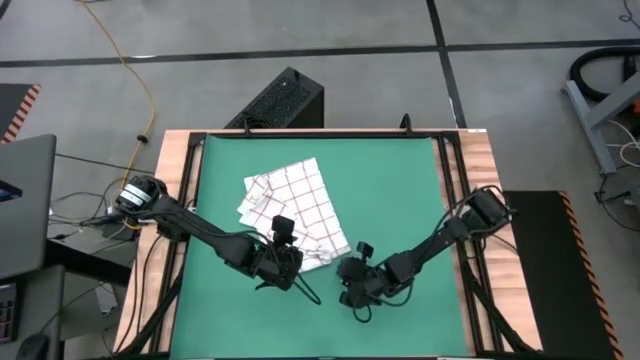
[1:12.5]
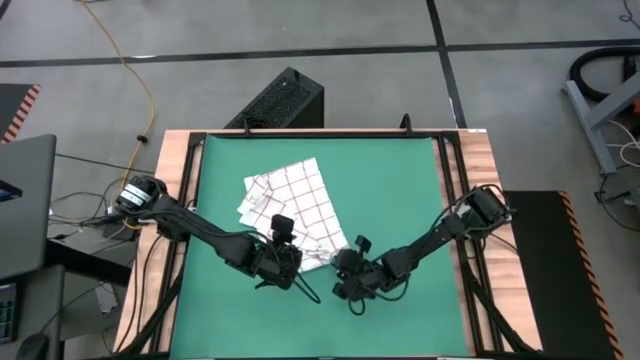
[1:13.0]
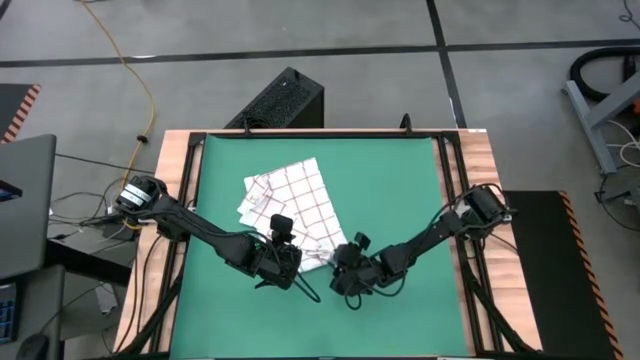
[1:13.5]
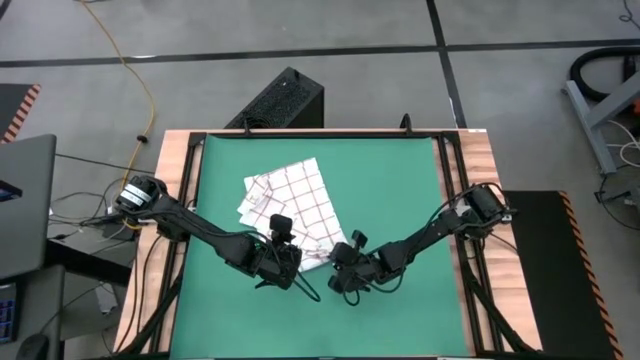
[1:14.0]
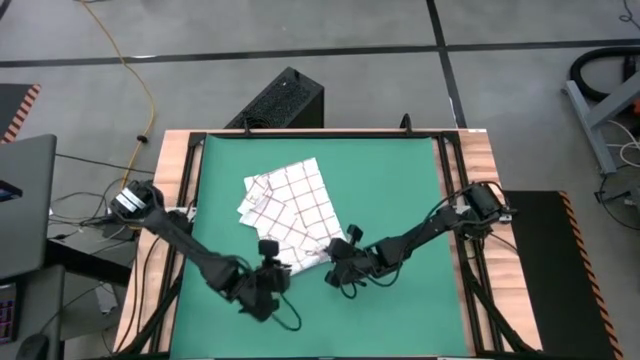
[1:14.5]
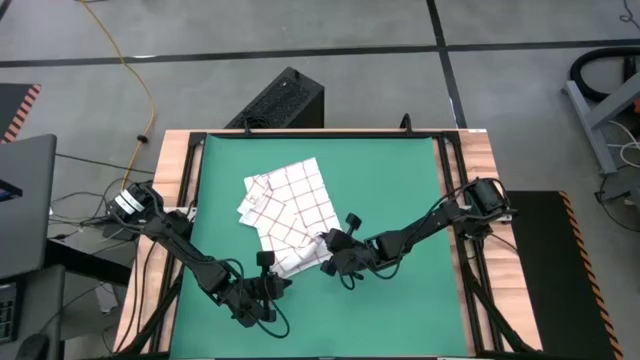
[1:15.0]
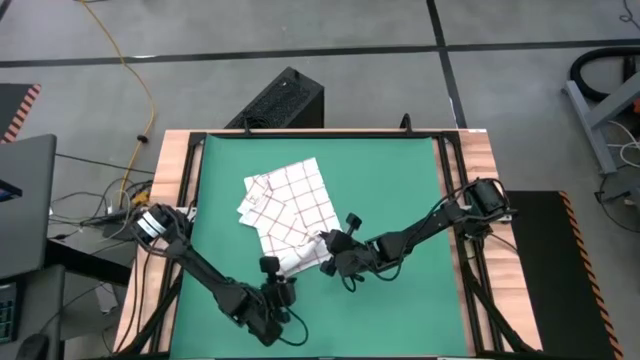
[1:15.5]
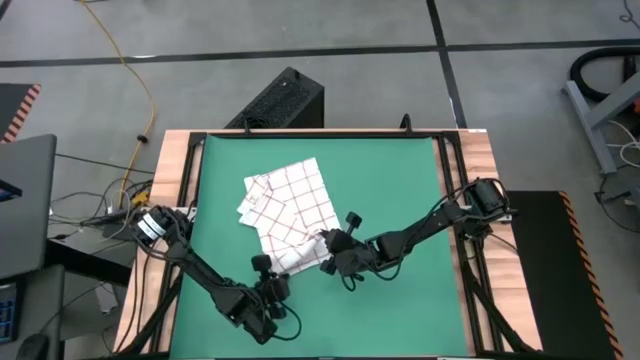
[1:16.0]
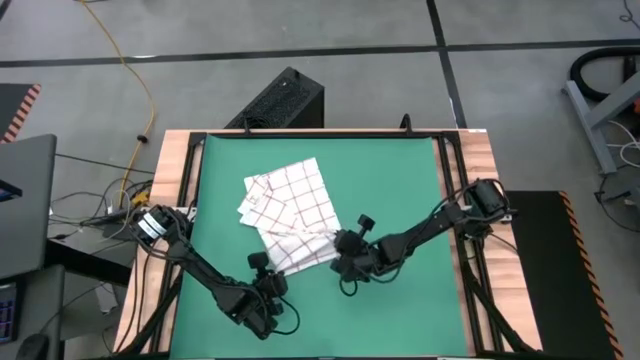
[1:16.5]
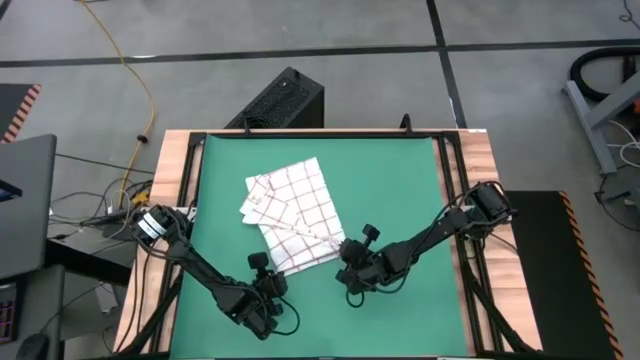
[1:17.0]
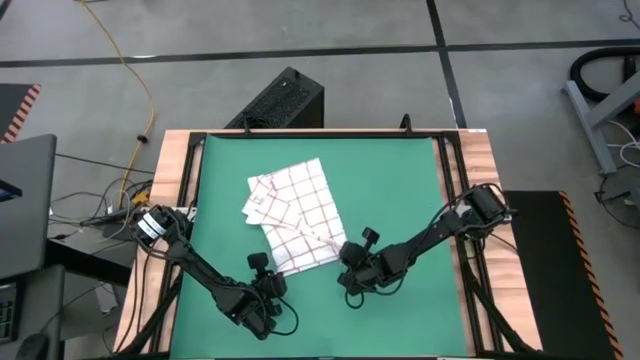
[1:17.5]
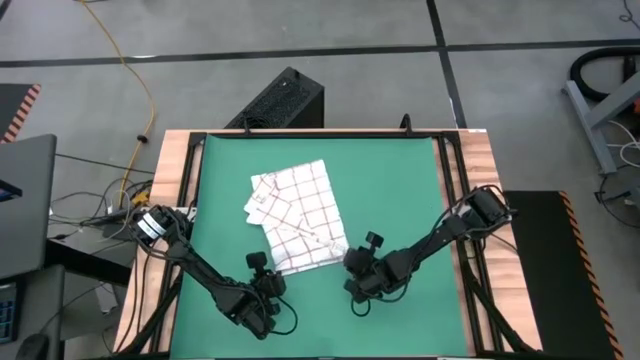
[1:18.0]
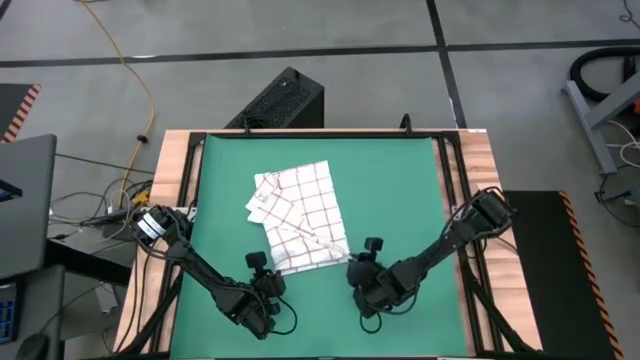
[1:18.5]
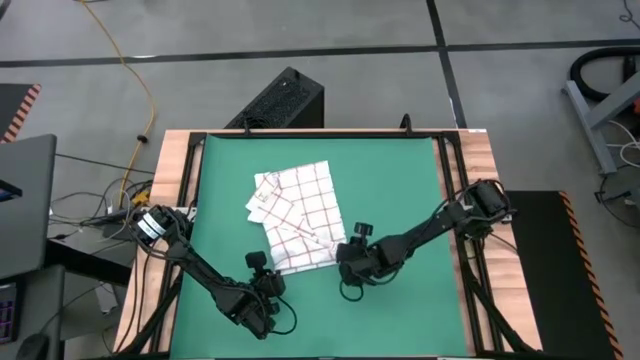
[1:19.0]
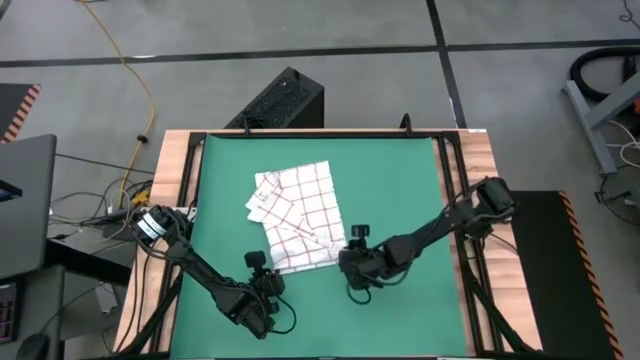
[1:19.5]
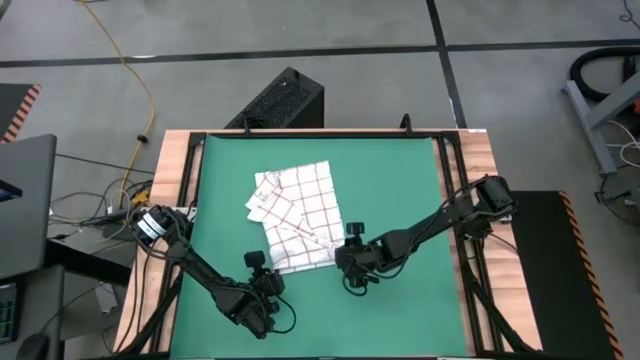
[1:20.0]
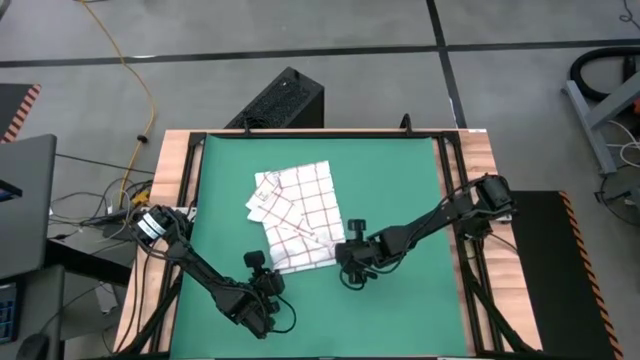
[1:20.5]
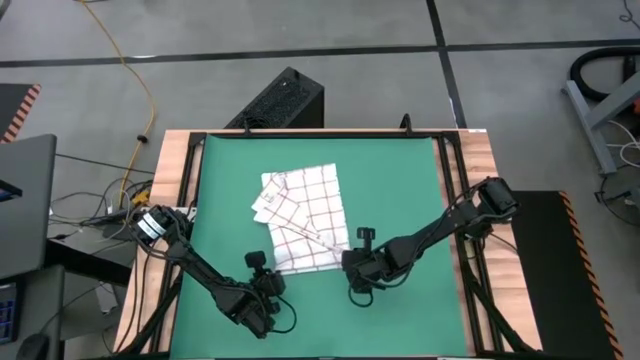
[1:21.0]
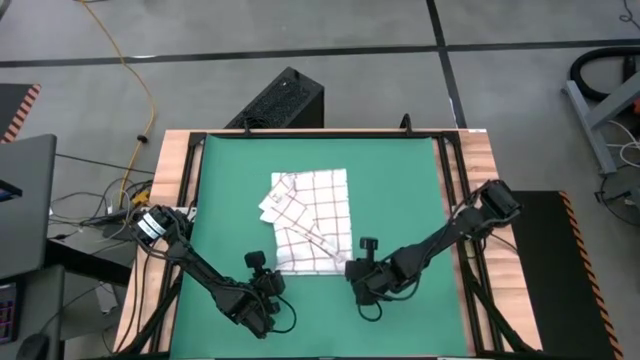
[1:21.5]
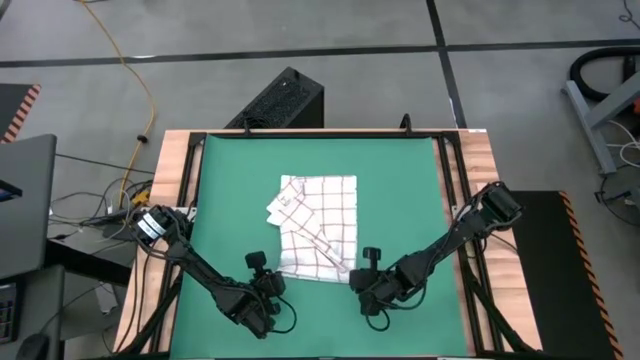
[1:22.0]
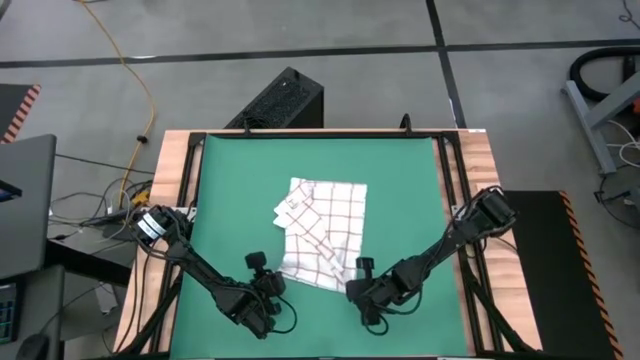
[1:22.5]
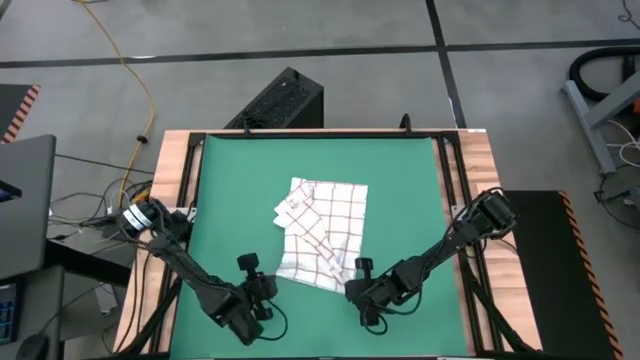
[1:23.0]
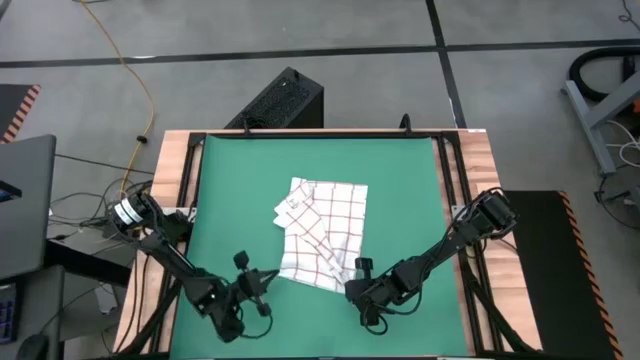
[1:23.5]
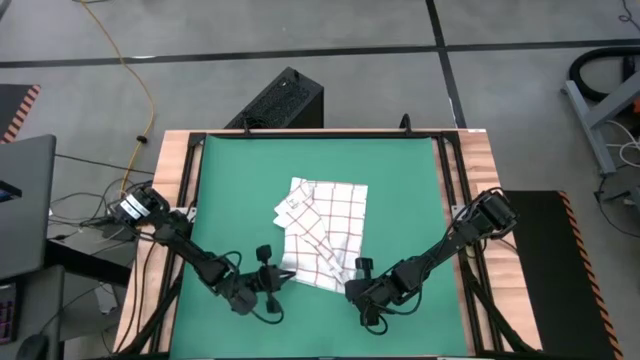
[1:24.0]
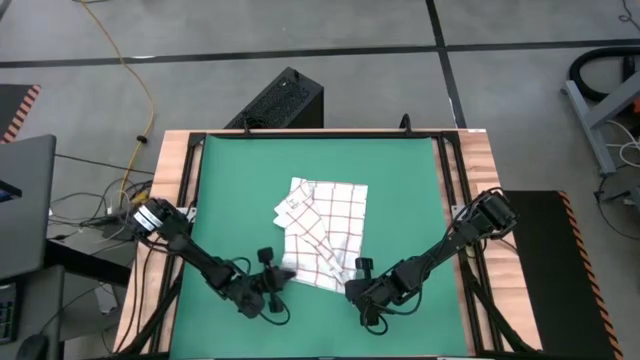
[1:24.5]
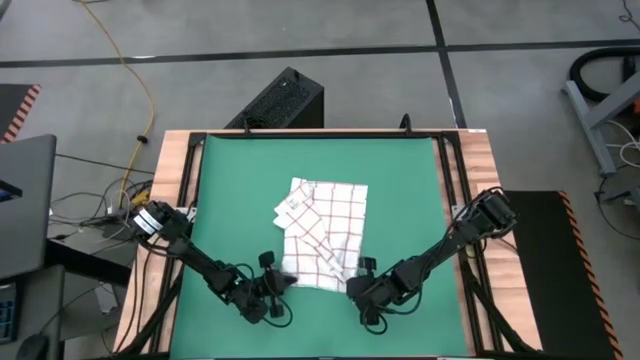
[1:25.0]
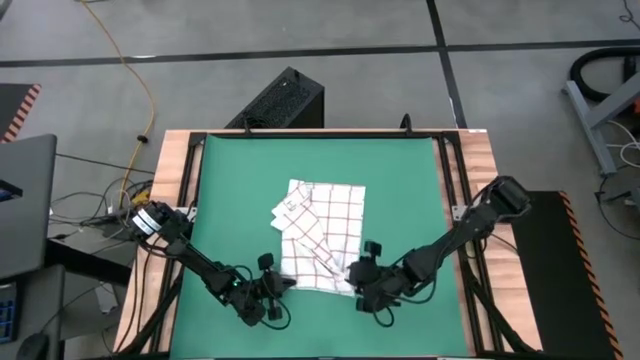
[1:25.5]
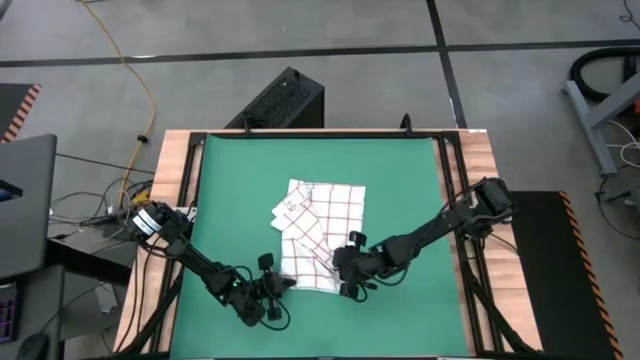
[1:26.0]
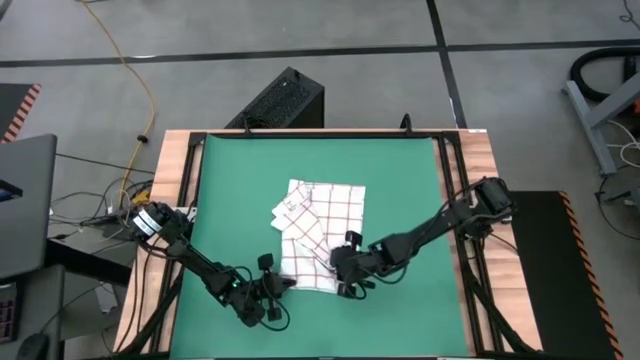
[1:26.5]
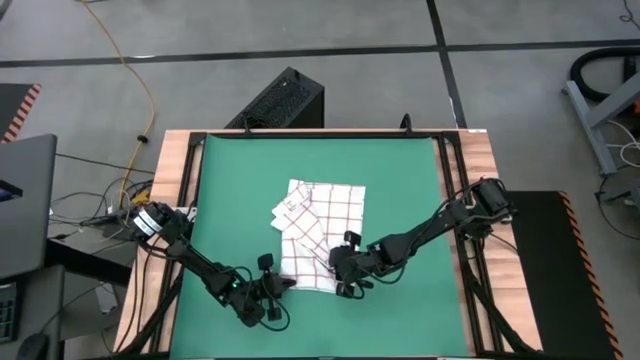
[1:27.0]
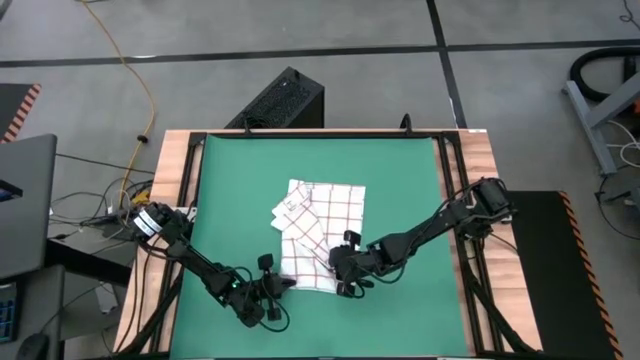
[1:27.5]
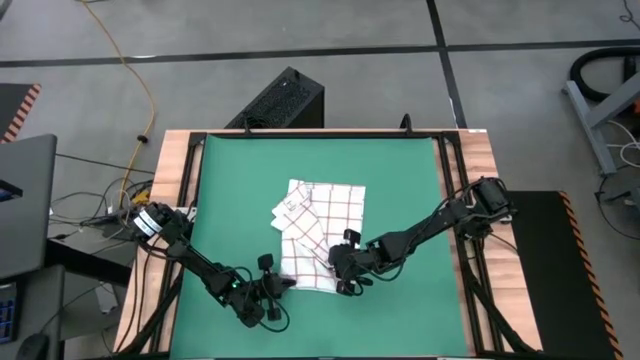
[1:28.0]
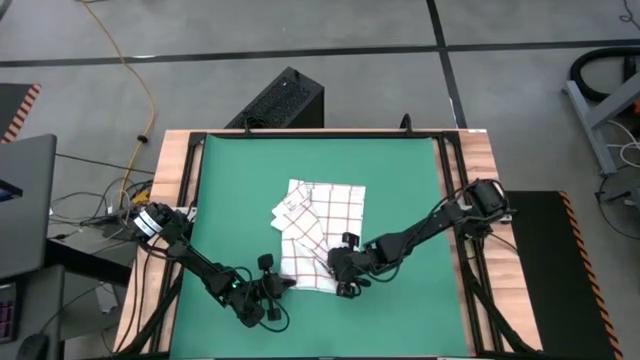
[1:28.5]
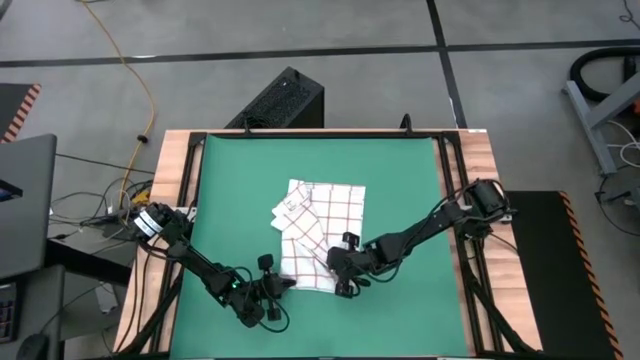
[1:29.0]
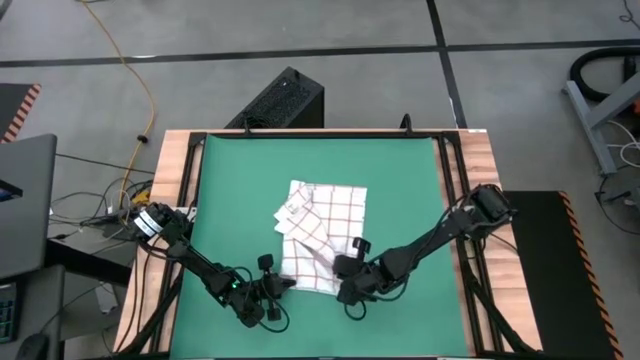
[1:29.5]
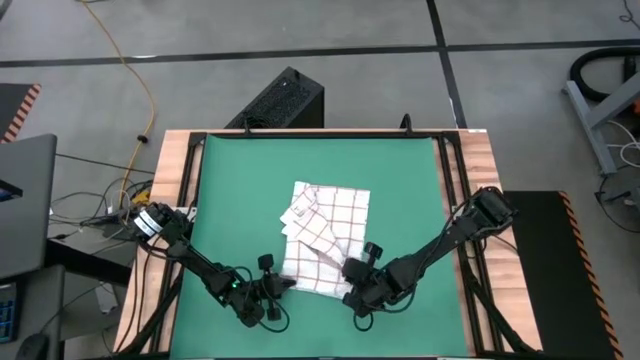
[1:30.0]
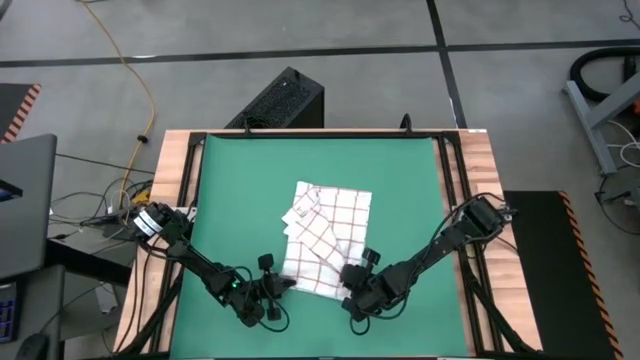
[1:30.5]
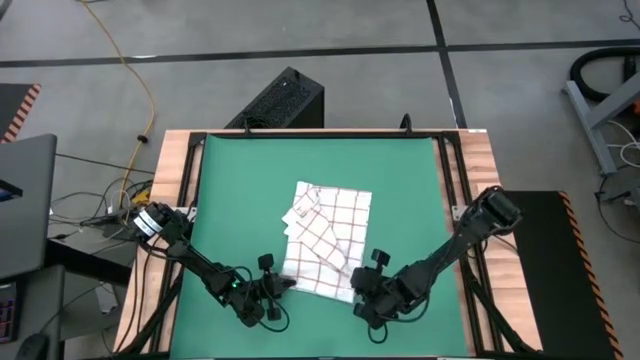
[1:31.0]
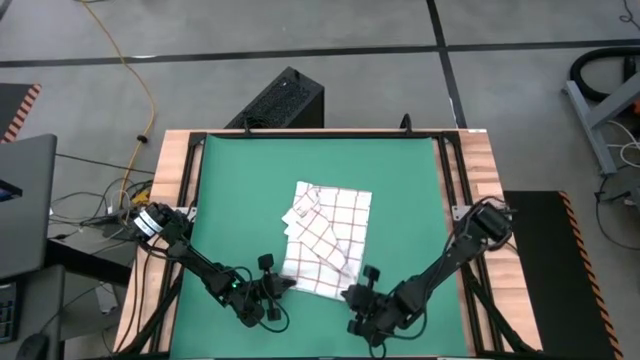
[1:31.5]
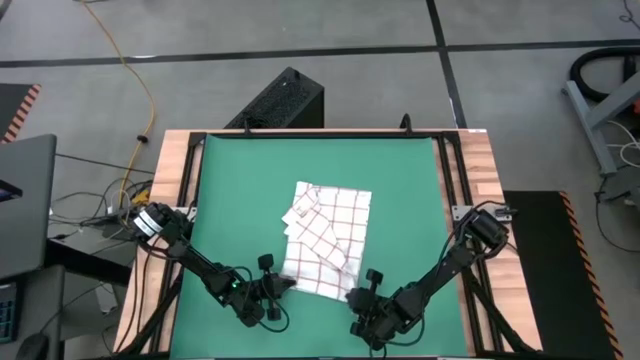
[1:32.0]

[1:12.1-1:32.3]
Task: Roll towel into tight, uniform cylinder
Fold the white towel

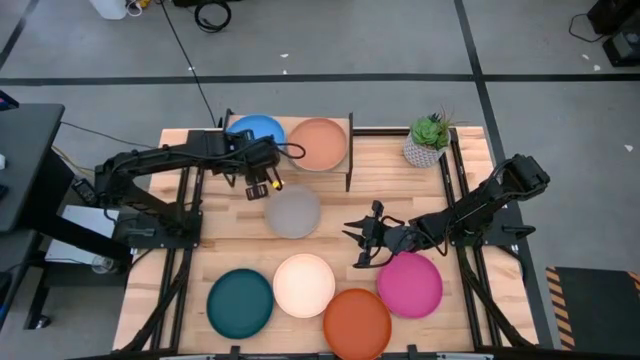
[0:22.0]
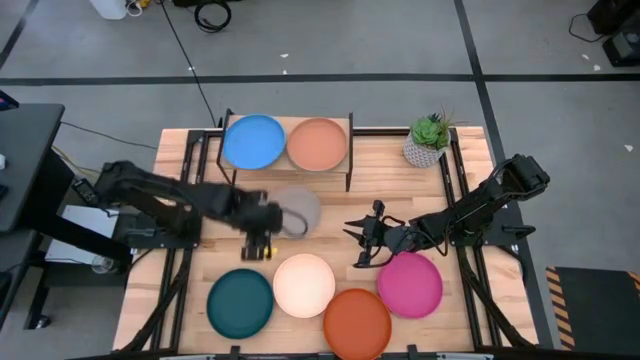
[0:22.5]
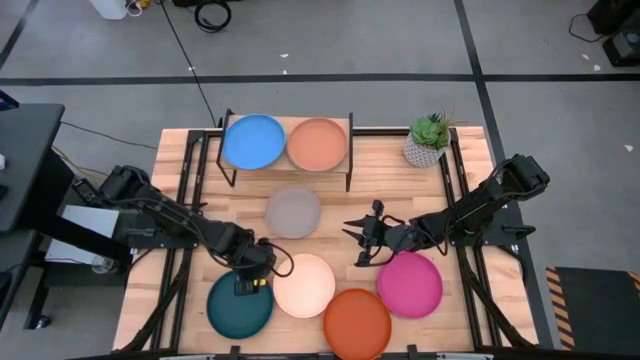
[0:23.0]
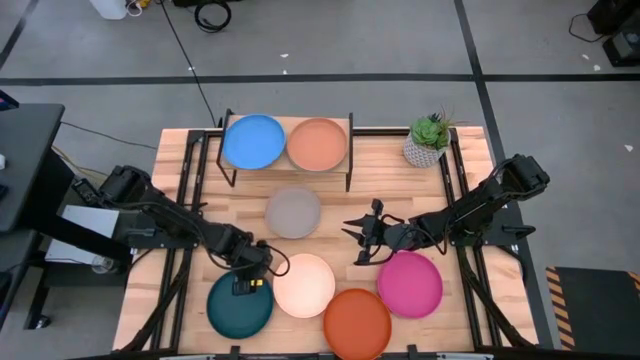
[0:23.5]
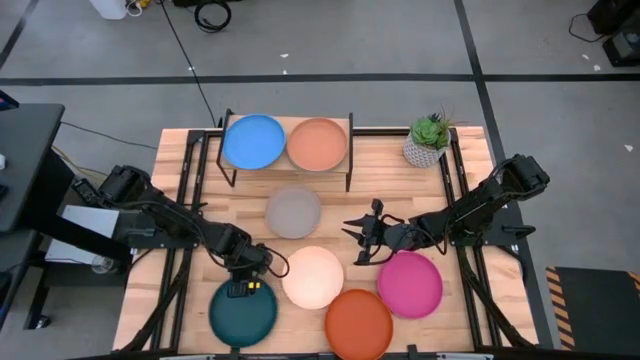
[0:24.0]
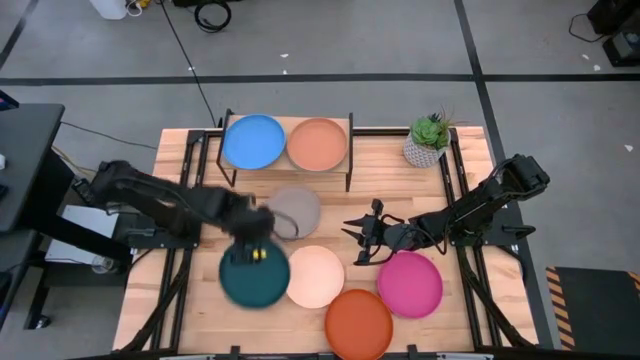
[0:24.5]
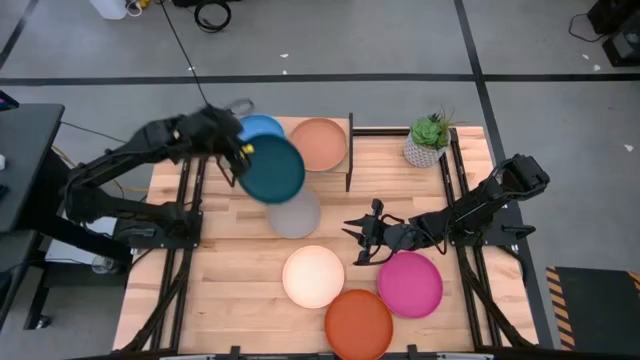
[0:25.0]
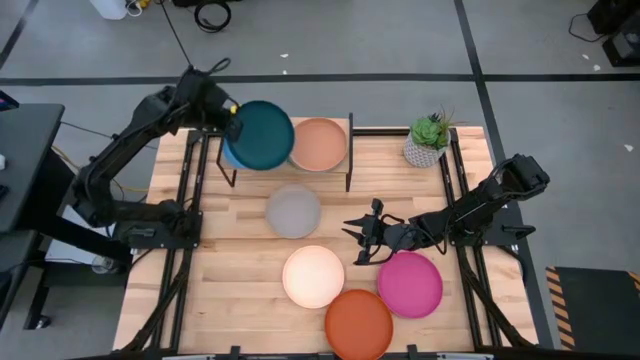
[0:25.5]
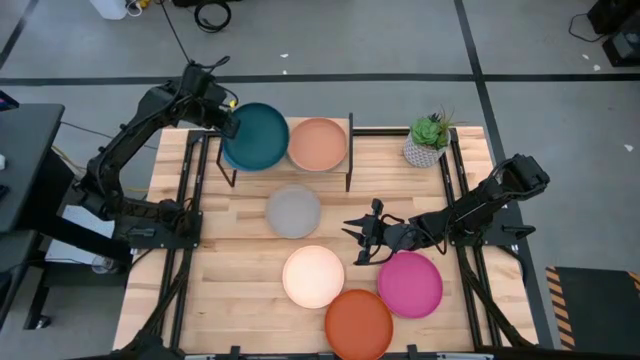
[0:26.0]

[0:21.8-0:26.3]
Task: Place and stack plates onto a shelf
Stack the dark blue plate on top of the blue plate on the shelf
